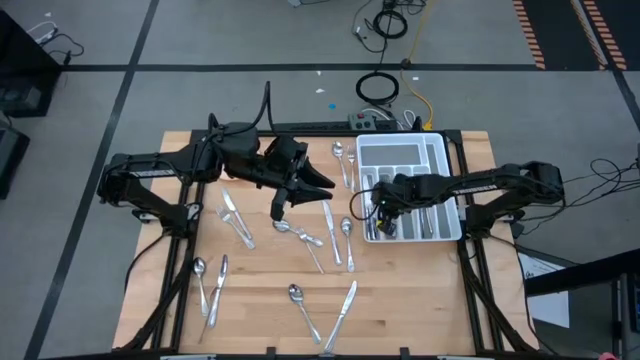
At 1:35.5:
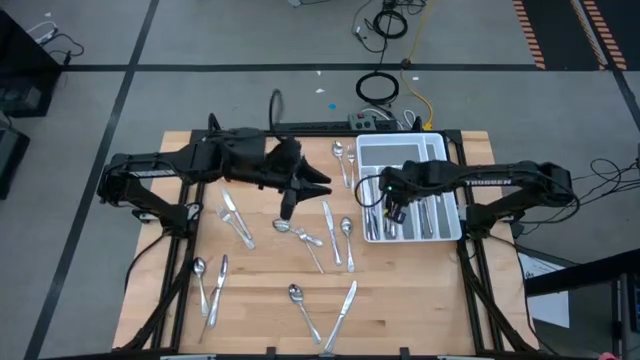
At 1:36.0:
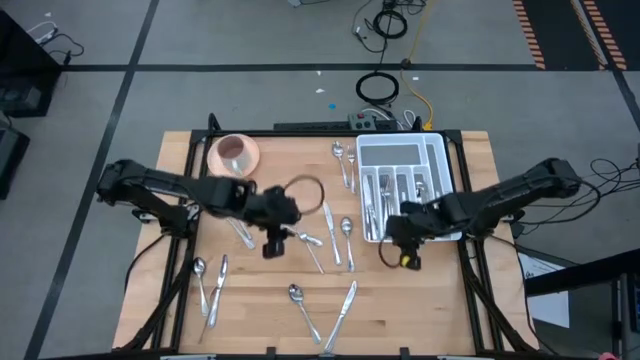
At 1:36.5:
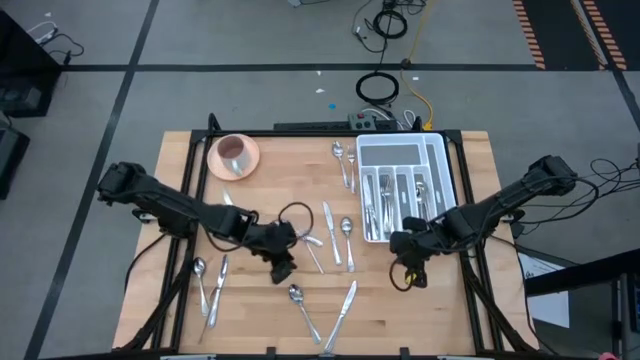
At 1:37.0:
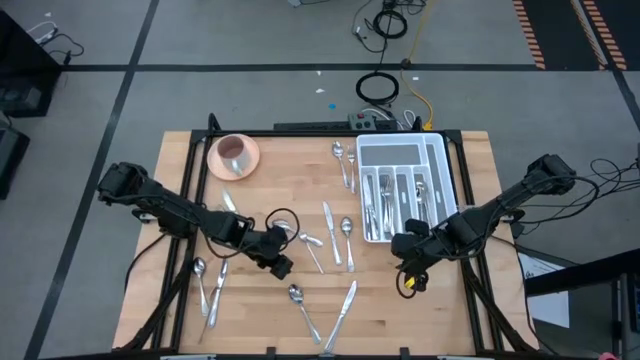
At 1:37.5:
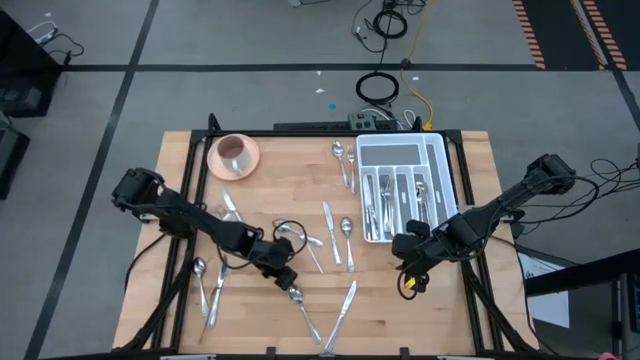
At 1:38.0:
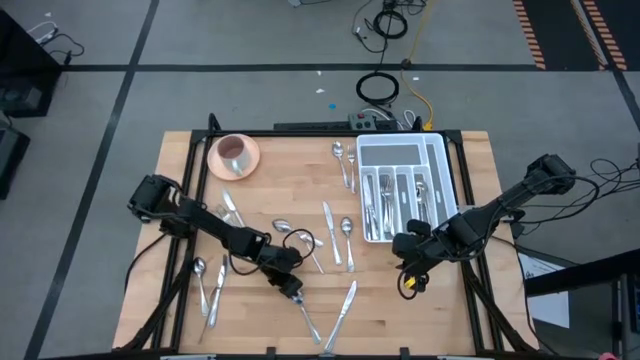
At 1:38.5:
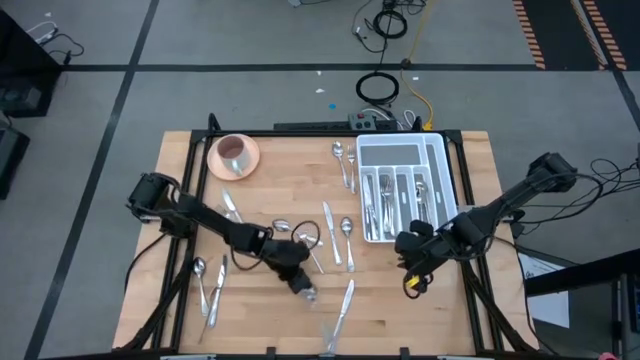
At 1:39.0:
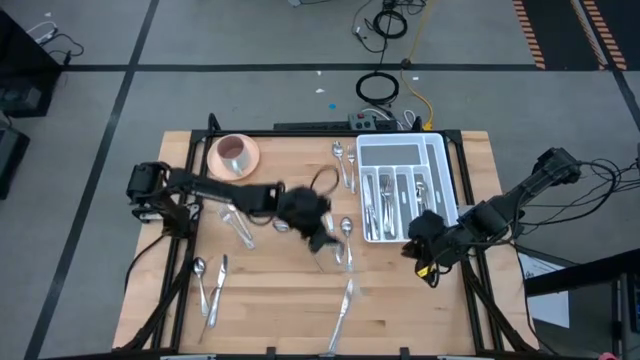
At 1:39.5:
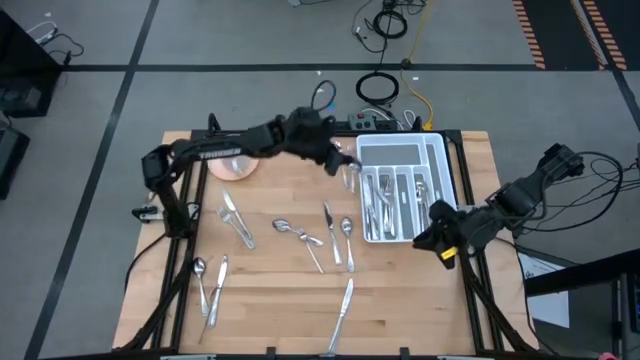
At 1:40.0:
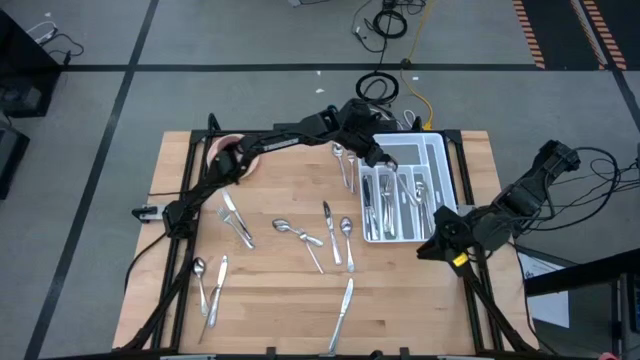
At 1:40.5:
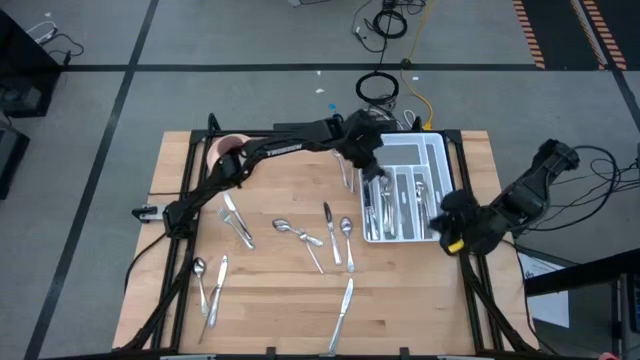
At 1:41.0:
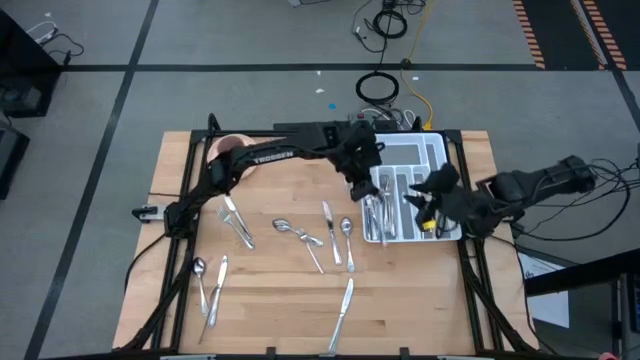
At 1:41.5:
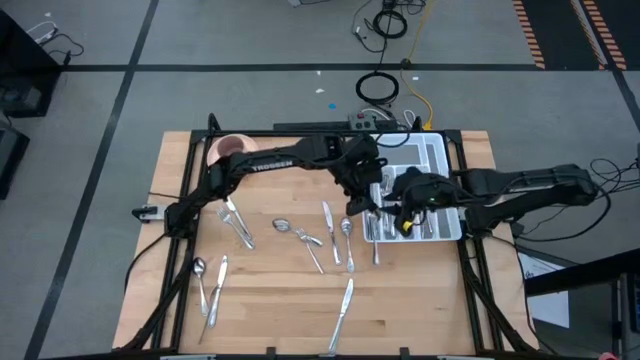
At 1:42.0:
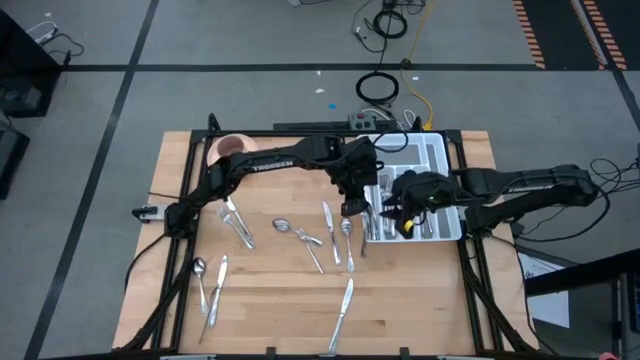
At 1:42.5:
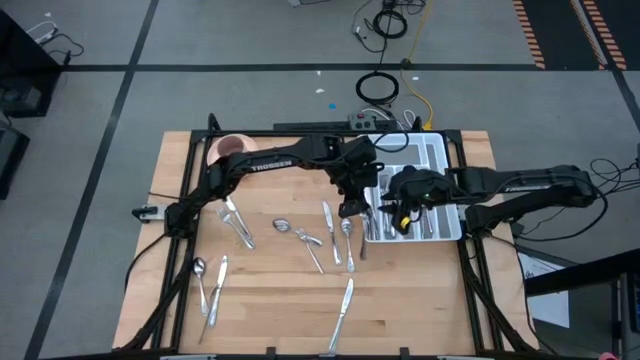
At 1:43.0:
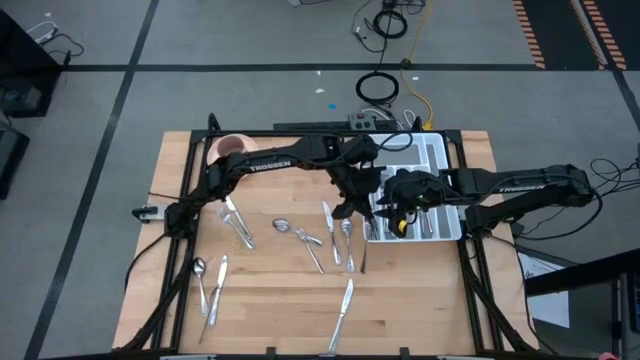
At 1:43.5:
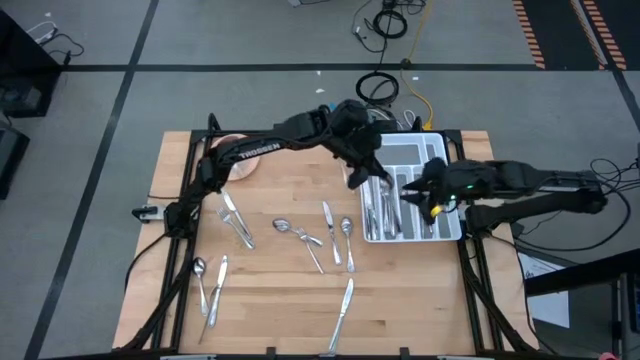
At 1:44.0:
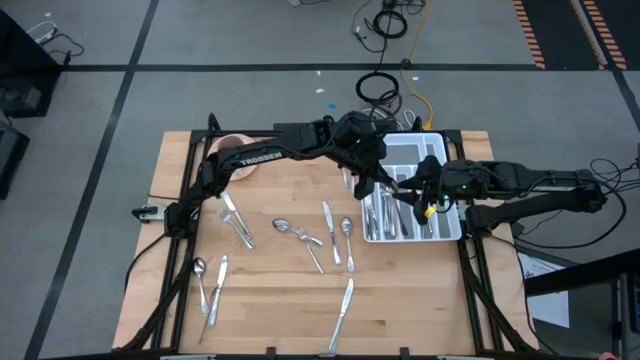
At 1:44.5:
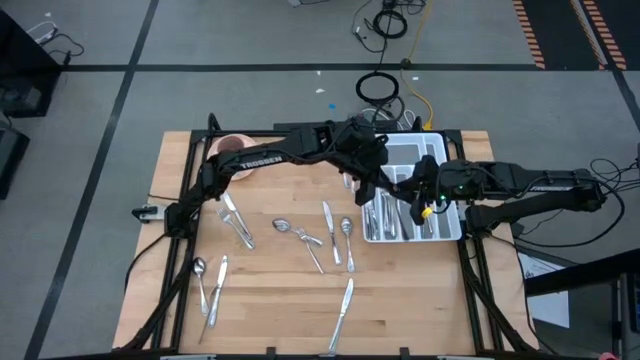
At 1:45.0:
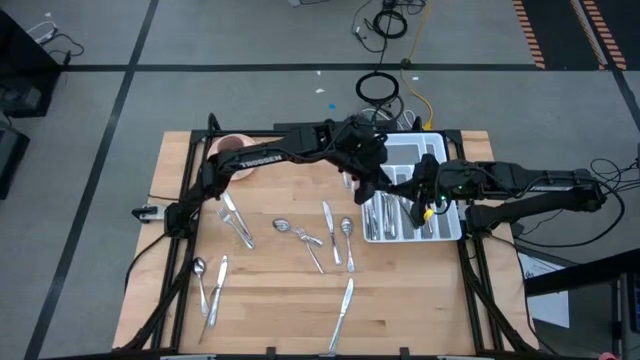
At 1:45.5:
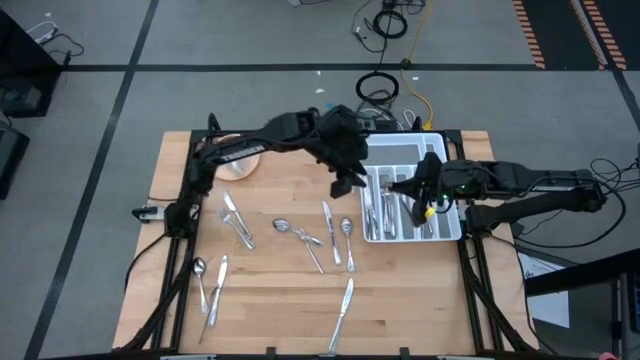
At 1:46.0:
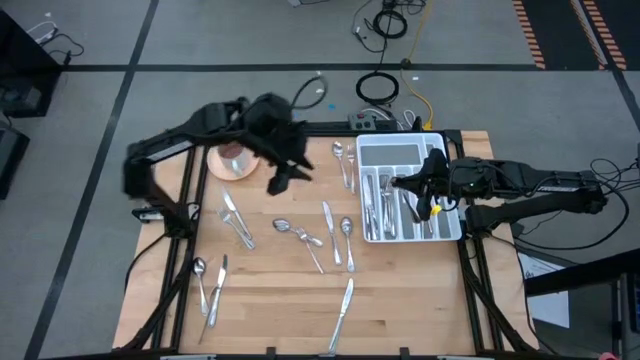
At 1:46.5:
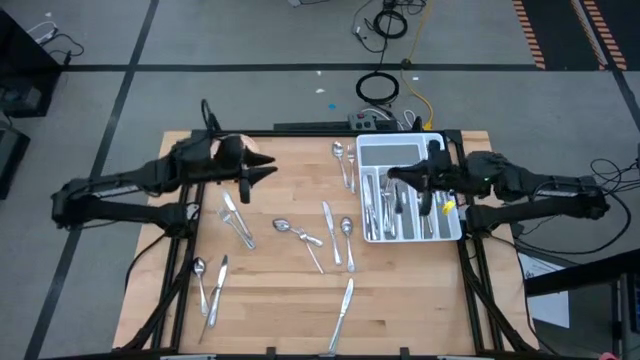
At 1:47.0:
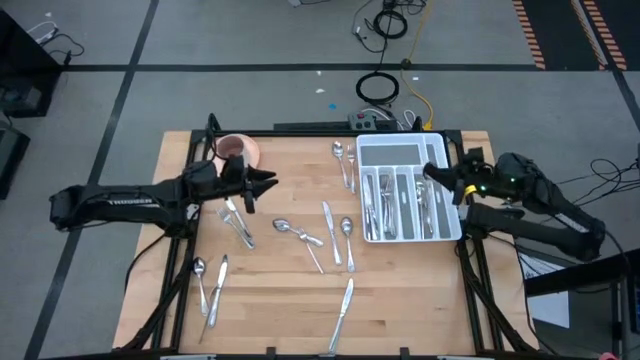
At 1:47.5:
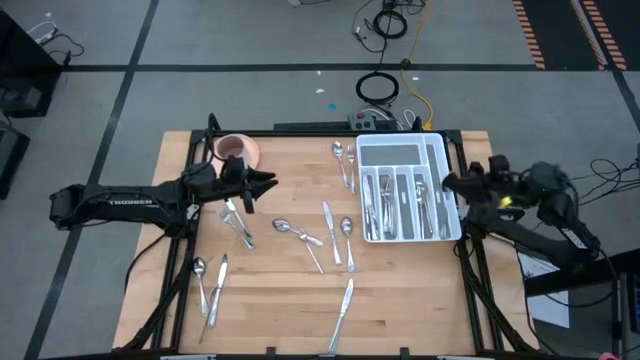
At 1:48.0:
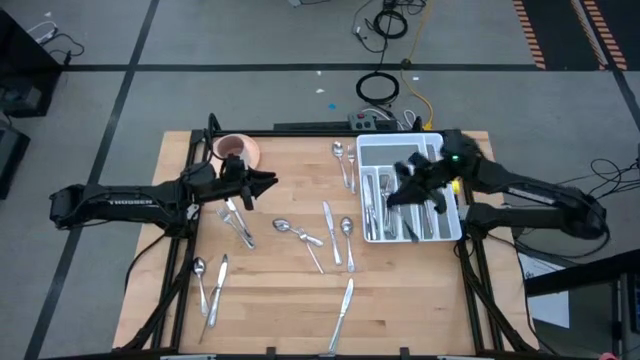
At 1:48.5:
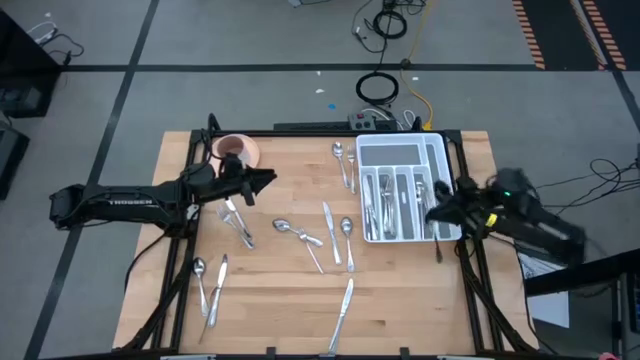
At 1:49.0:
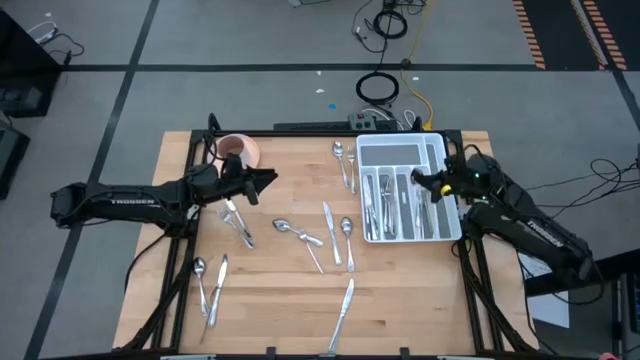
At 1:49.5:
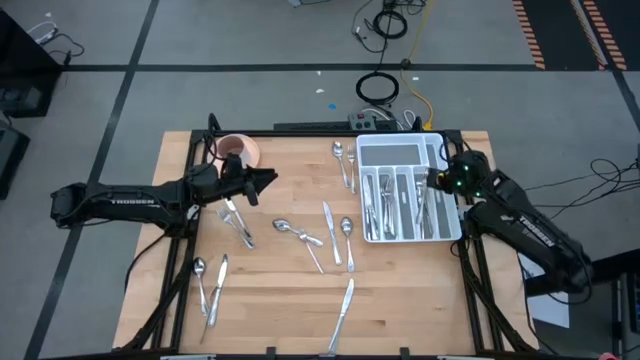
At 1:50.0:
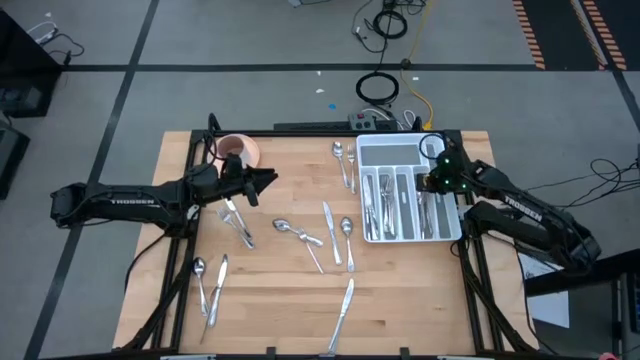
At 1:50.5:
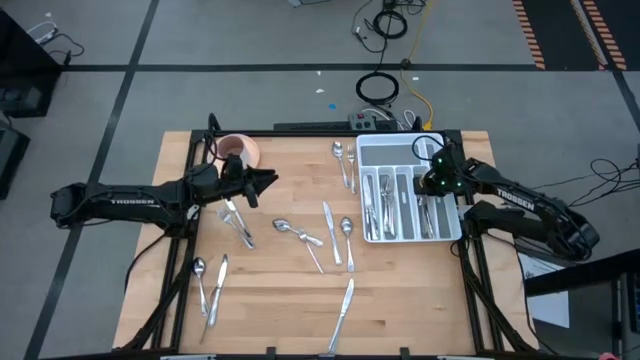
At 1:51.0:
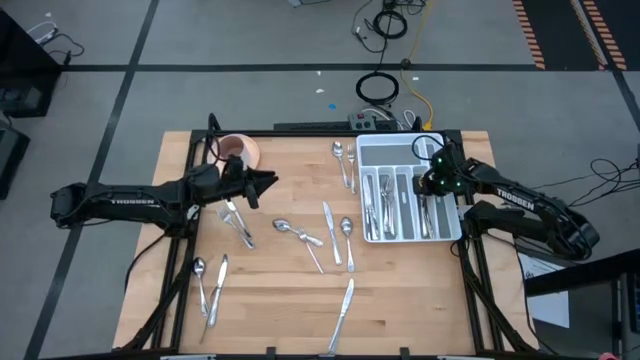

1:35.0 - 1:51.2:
Task: Sort silverware
Put the silver spoon into the silverware rack
